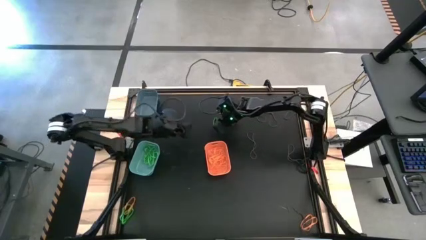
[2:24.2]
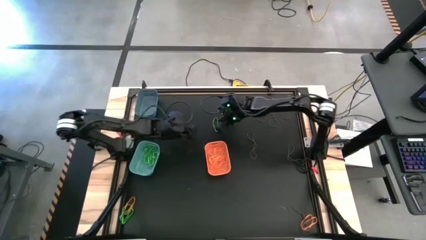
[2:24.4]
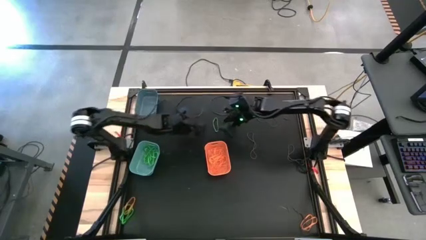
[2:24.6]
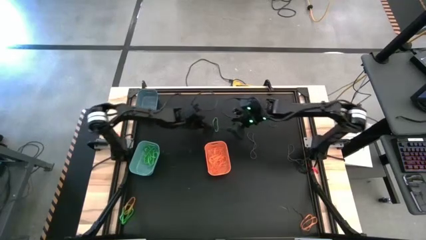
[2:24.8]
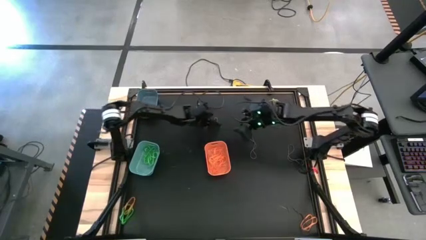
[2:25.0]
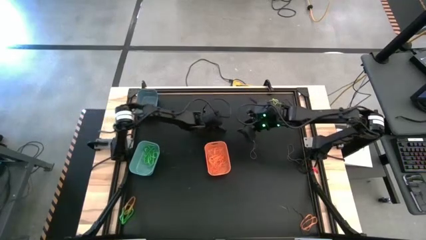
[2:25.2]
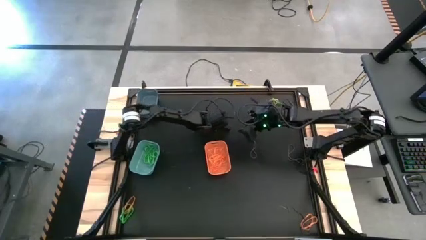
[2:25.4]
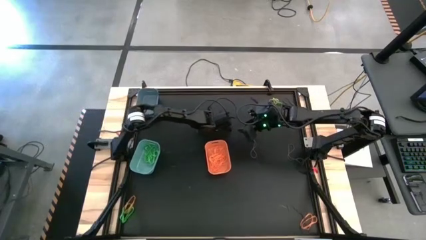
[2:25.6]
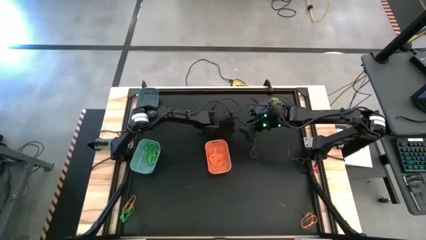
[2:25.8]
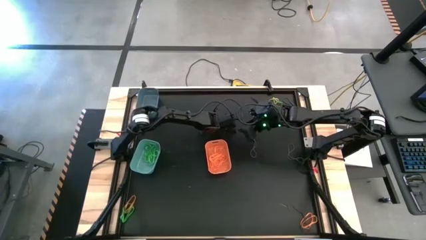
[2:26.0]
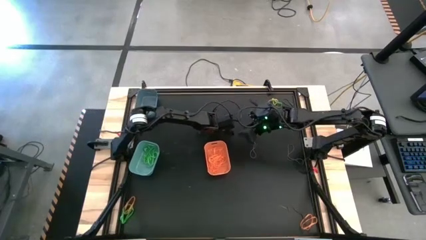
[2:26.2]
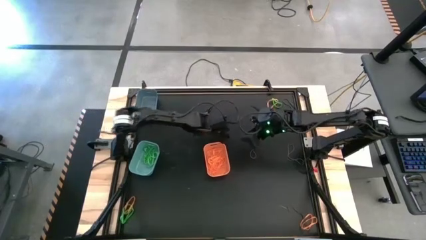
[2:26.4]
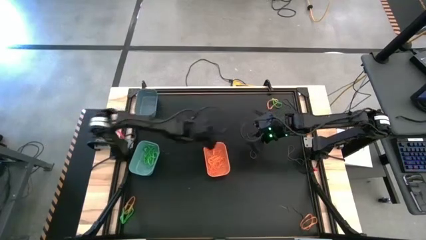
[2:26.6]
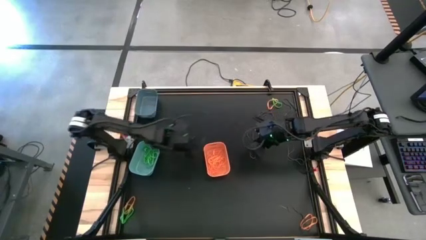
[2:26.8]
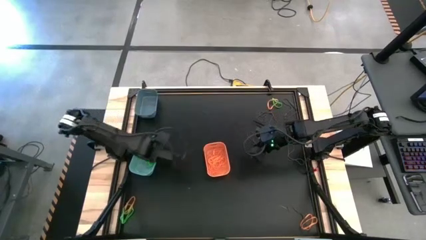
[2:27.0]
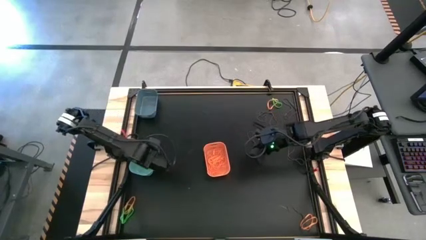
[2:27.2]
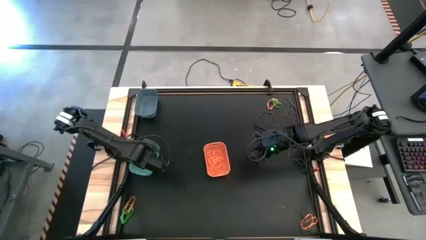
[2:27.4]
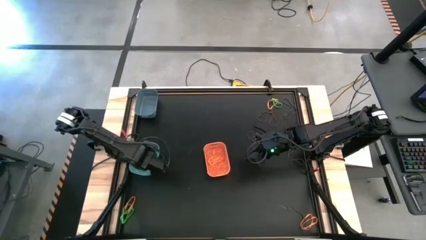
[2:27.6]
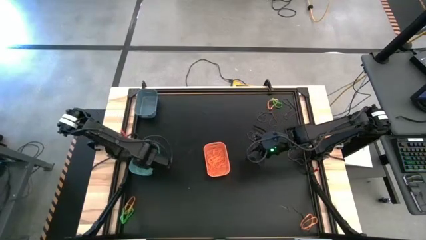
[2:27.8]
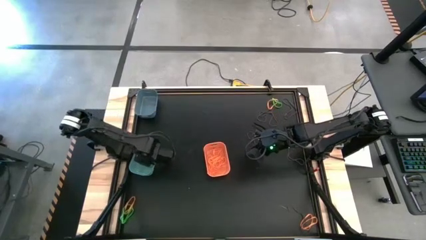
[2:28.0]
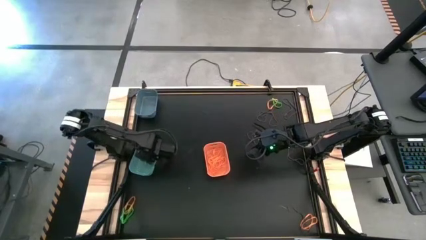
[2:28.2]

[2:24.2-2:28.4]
Task: Sort rubber bands into baskets
Put the green rubber band into the light sea green bin

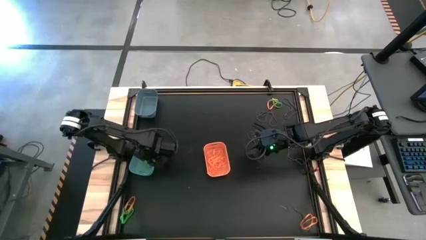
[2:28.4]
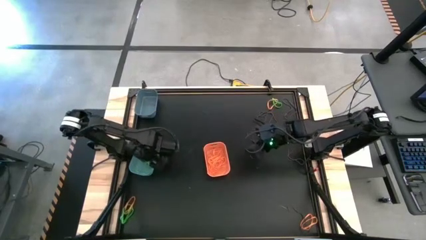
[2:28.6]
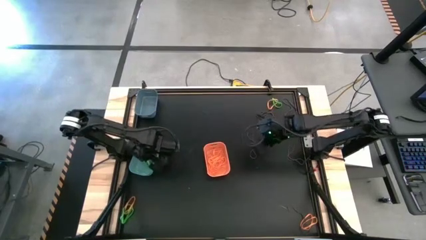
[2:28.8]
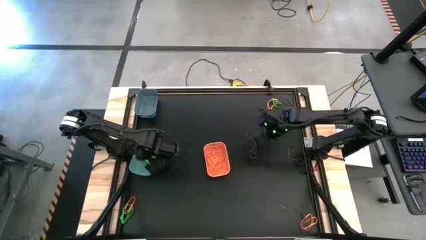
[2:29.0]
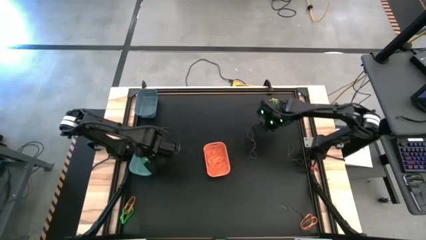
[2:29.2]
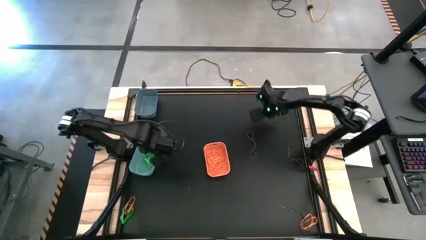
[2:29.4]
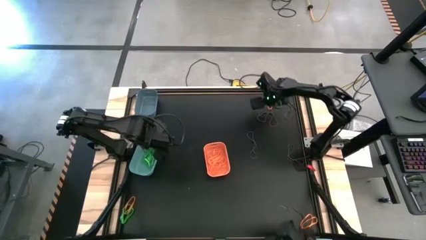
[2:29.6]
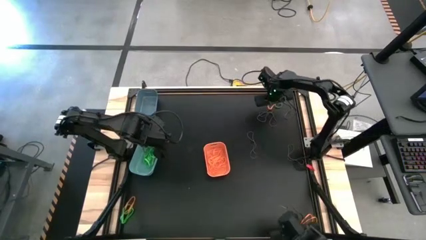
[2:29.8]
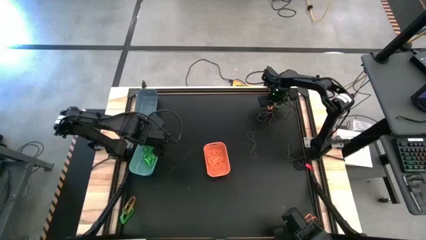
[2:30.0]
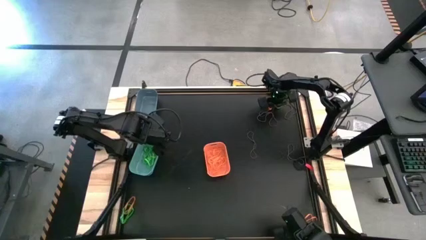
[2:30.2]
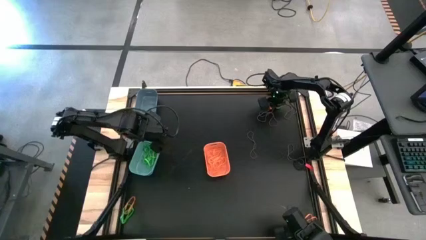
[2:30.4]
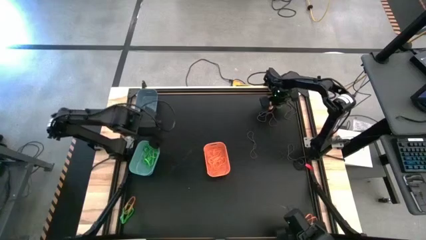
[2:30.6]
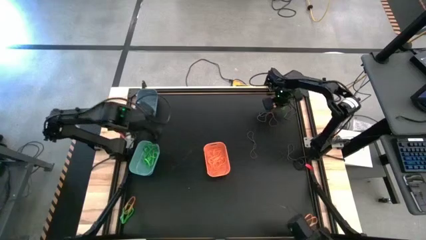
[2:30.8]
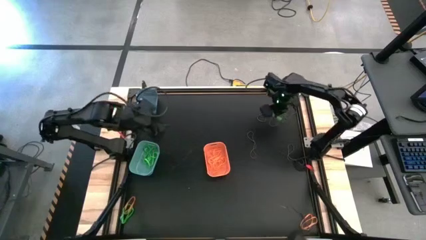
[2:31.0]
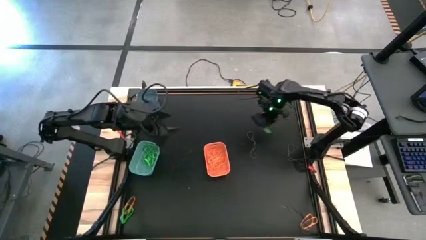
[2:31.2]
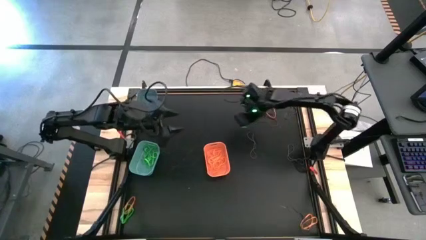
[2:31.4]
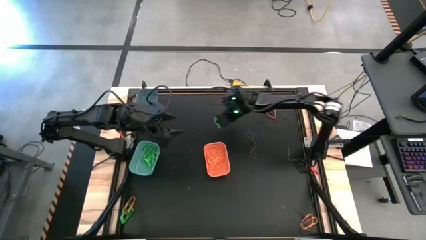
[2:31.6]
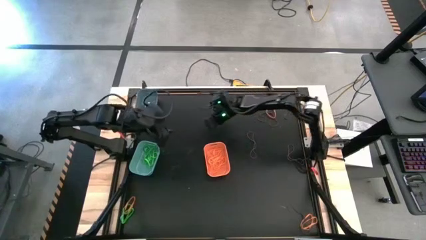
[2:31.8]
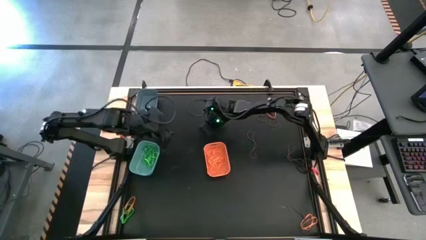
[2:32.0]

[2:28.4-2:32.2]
Move the green rubber band

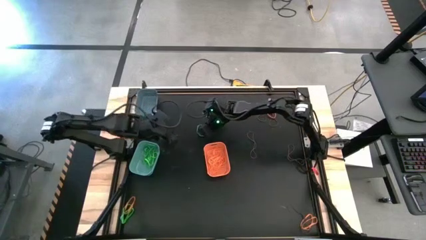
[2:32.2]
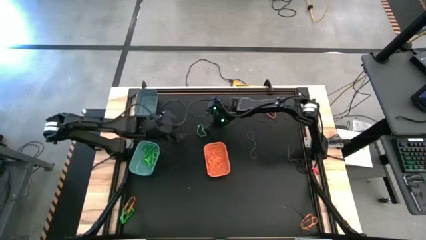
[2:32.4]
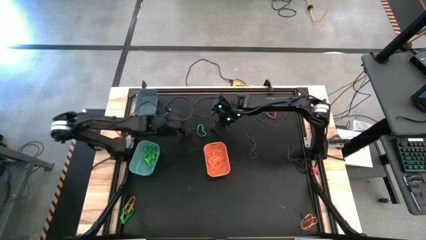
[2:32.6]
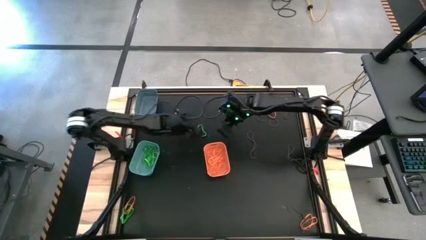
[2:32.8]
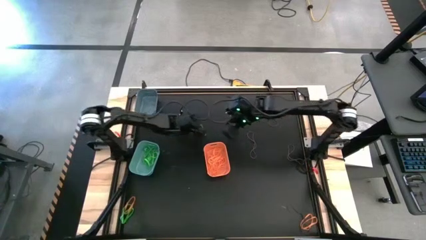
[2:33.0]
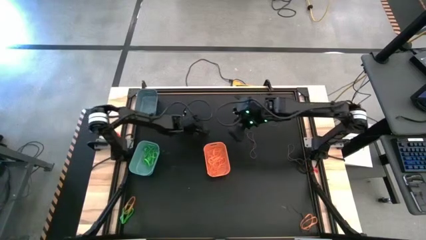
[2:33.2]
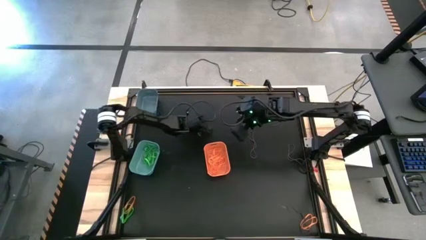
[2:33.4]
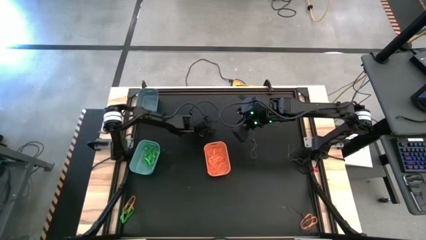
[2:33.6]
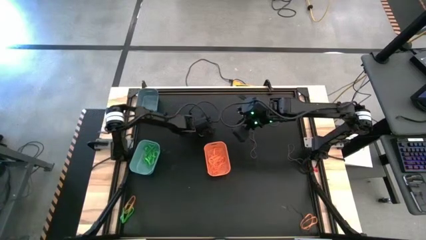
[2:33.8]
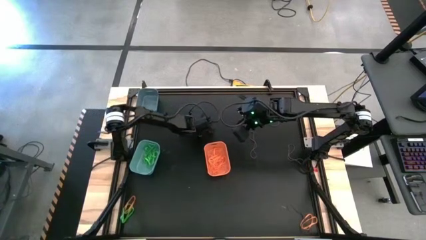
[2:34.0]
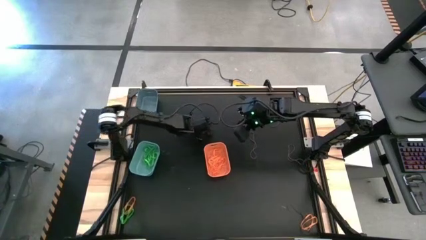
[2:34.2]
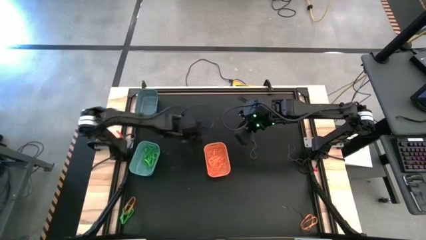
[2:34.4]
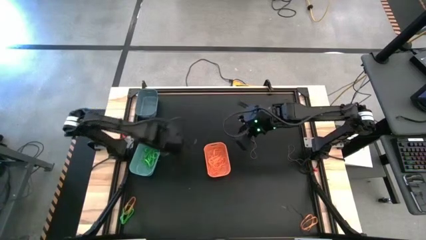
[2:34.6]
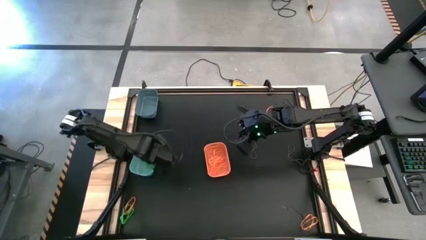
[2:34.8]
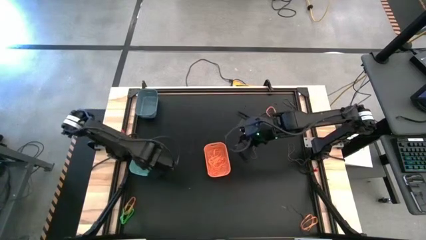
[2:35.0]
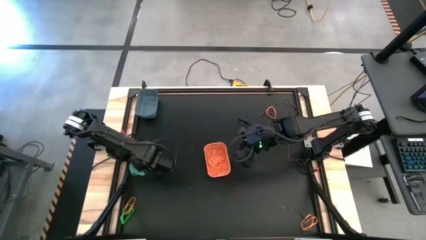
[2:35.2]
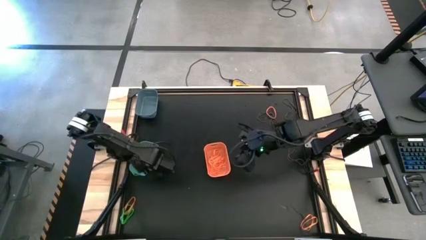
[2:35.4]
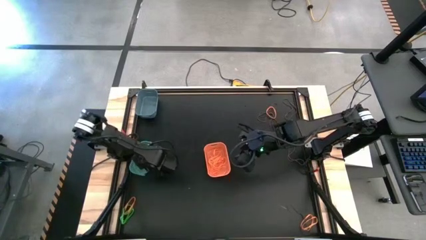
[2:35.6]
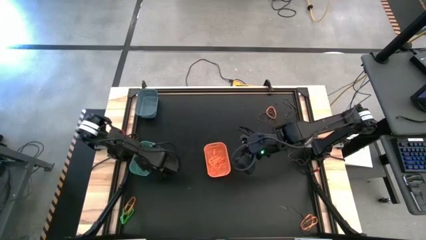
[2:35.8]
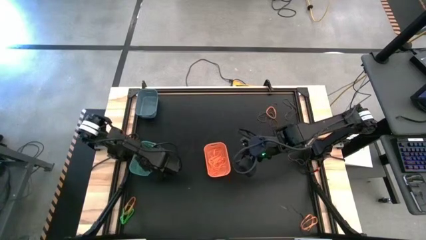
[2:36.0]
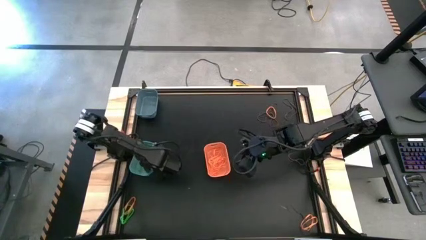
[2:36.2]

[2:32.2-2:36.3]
Put the green rubber band into the light sea green bin

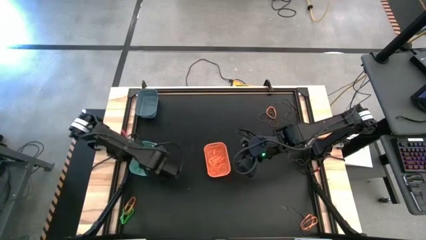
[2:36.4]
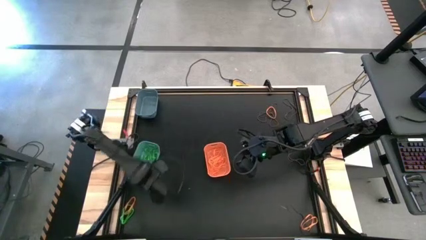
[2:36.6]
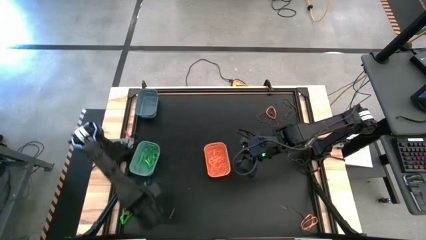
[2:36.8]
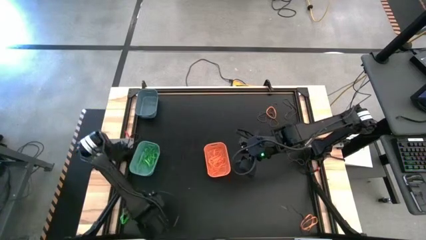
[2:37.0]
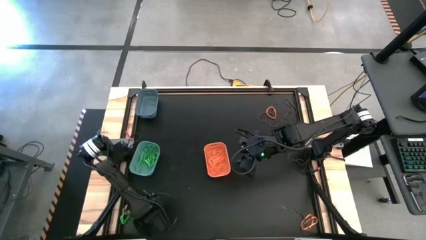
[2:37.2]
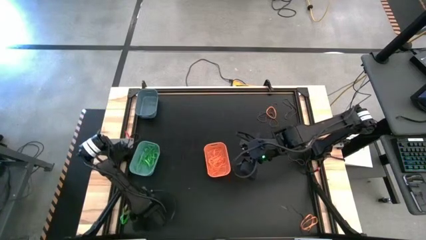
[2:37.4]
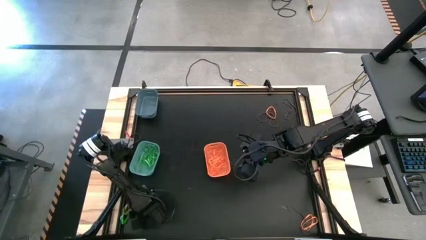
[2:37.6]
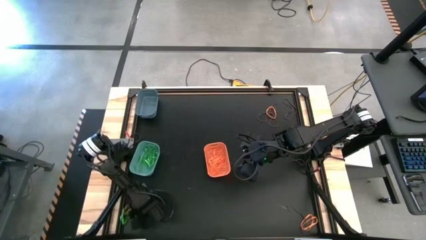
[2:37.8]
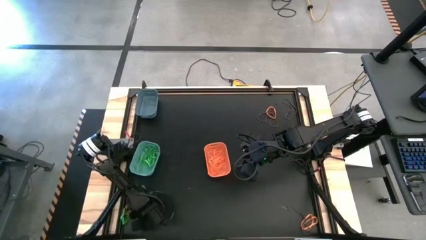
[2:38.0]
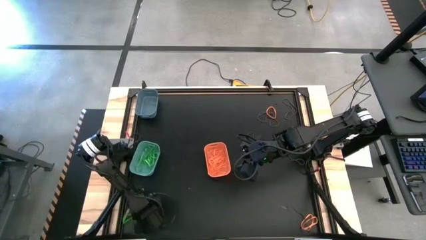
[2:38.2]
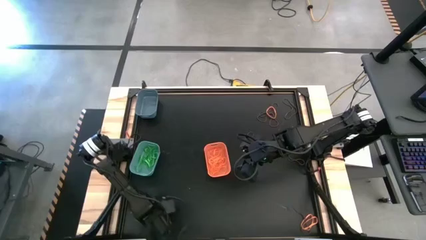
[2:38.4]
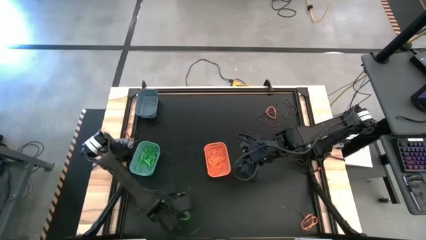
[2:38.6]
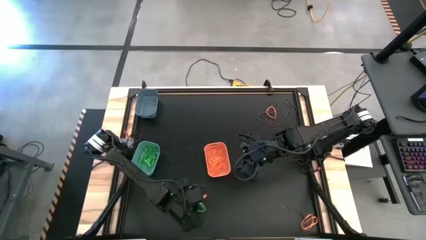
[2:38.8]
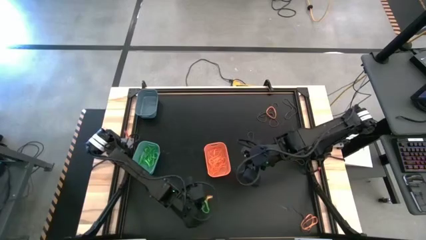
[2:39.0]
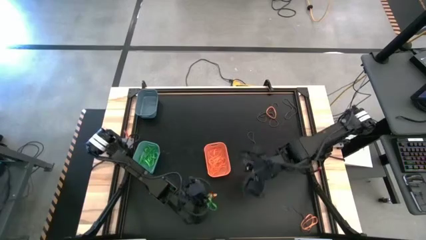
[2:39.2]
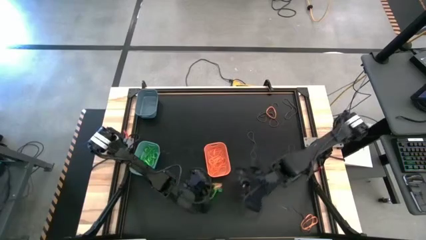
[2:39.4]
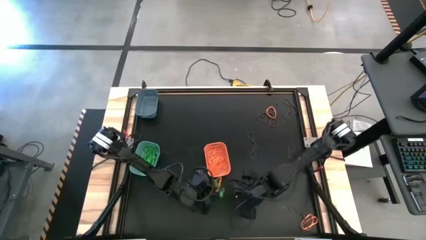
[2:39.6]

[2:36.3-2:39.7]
Move the rubber bands
